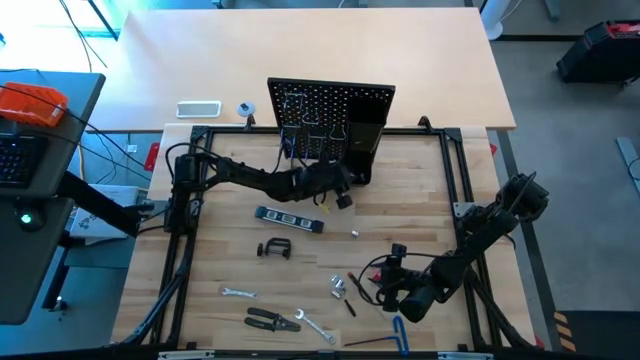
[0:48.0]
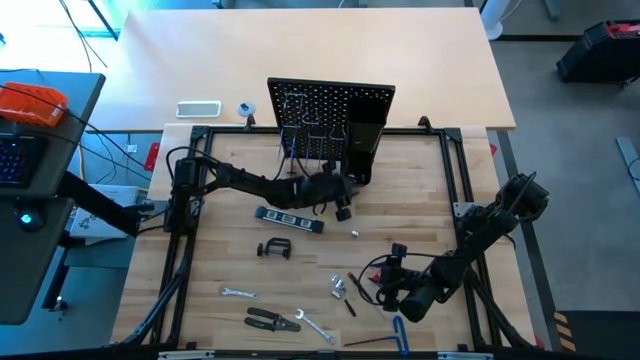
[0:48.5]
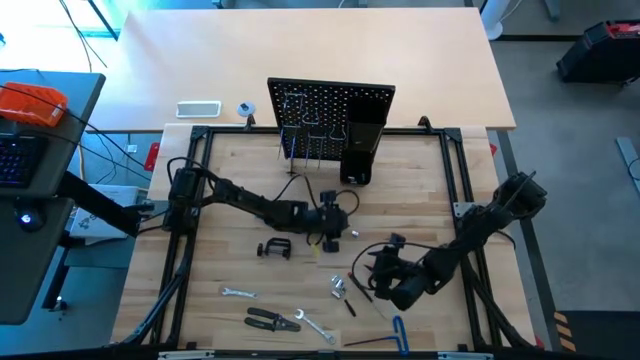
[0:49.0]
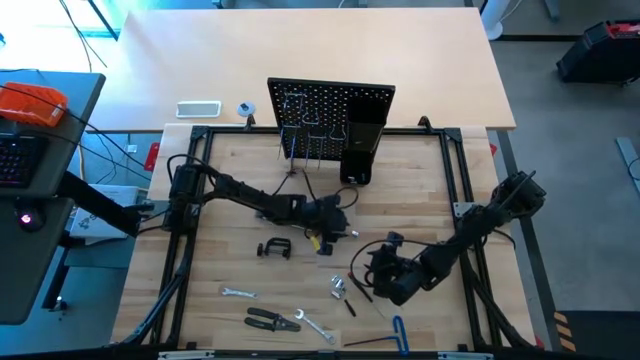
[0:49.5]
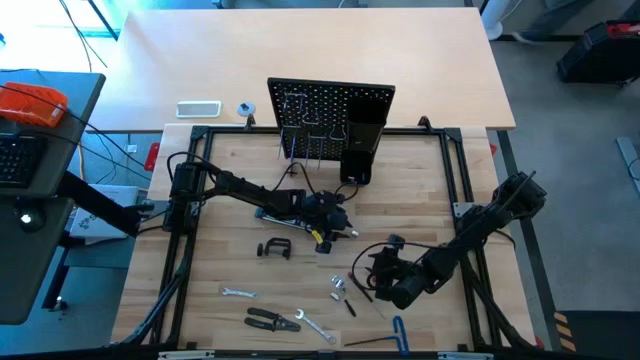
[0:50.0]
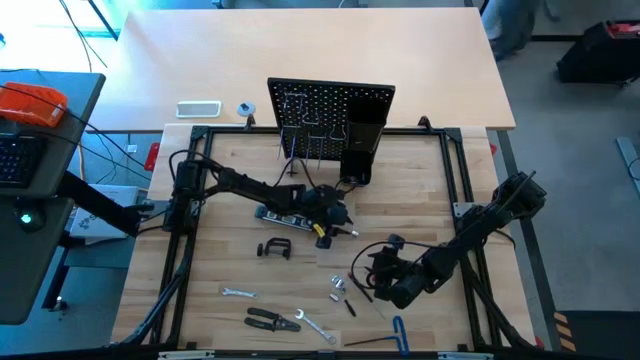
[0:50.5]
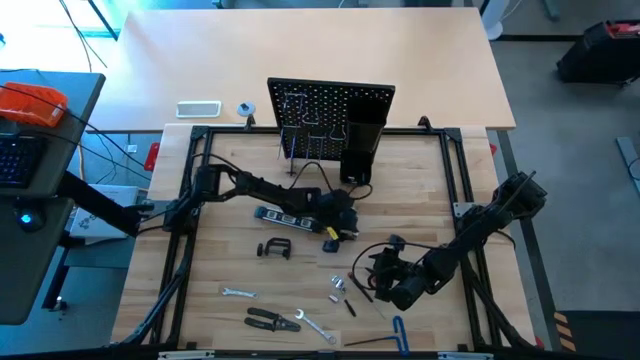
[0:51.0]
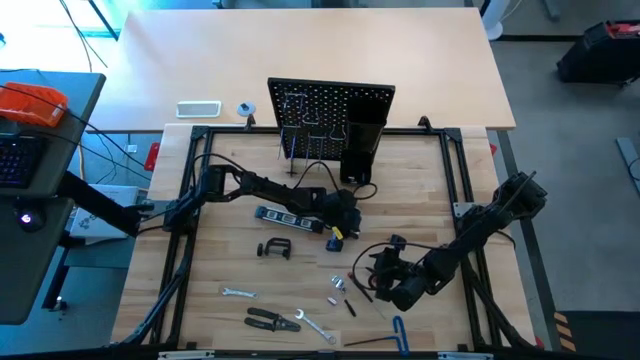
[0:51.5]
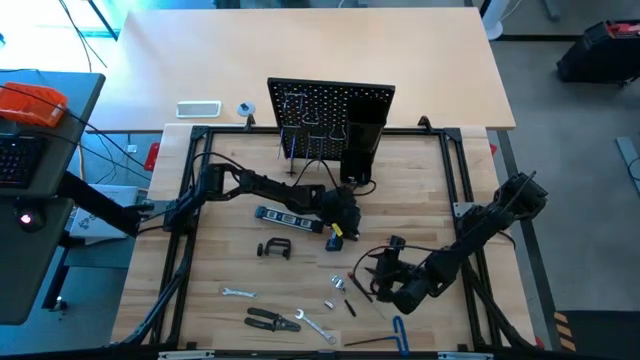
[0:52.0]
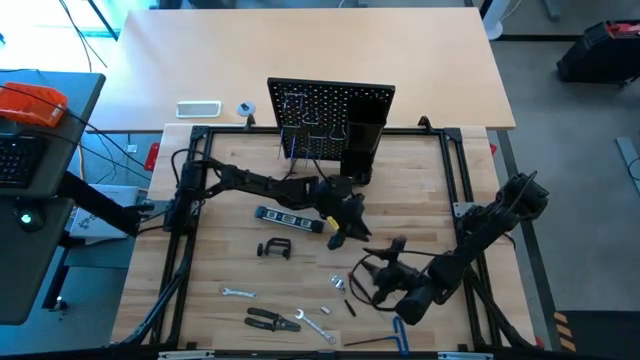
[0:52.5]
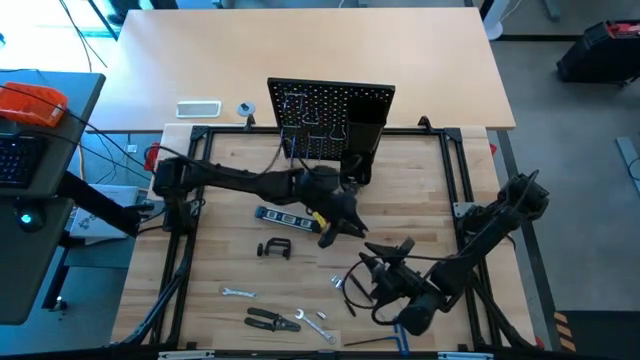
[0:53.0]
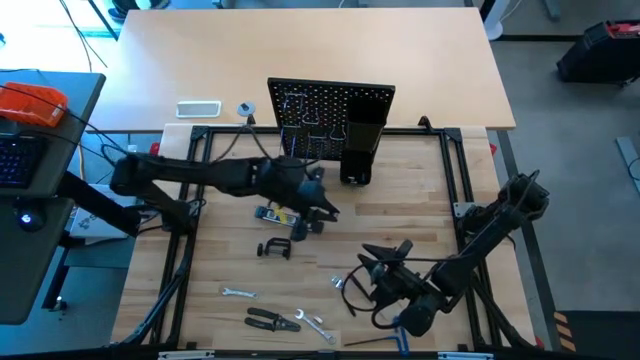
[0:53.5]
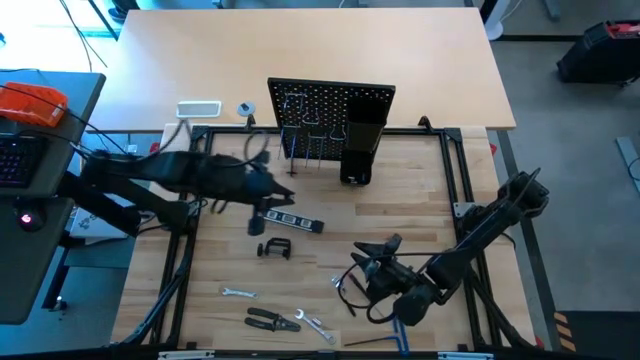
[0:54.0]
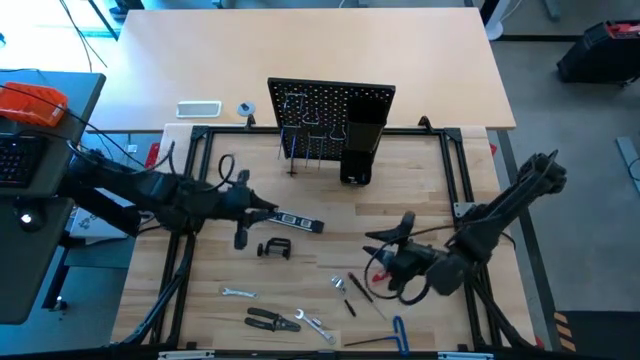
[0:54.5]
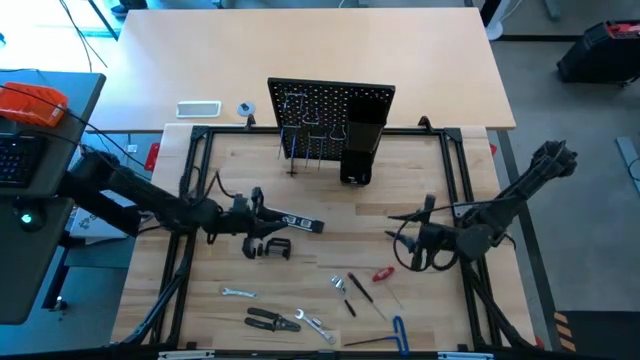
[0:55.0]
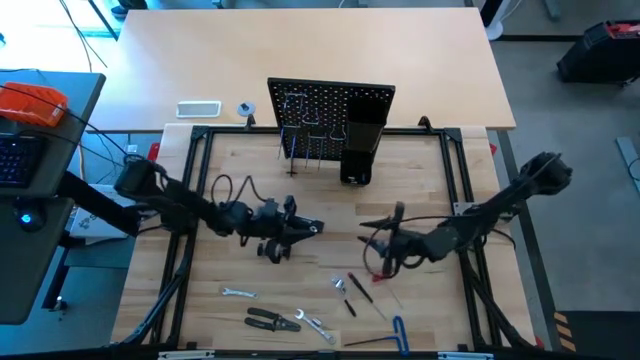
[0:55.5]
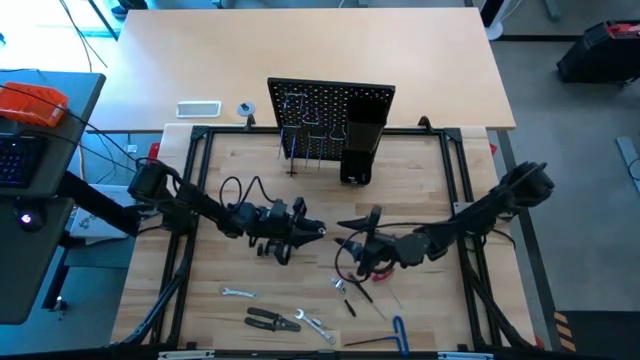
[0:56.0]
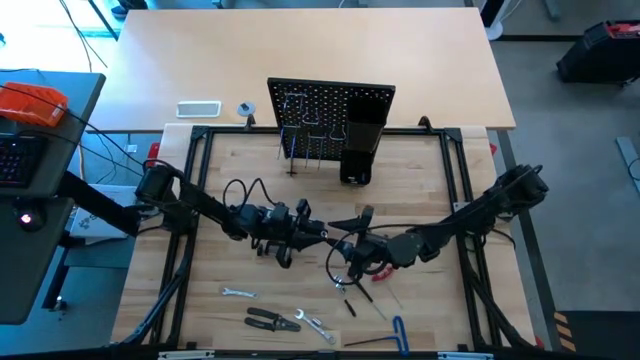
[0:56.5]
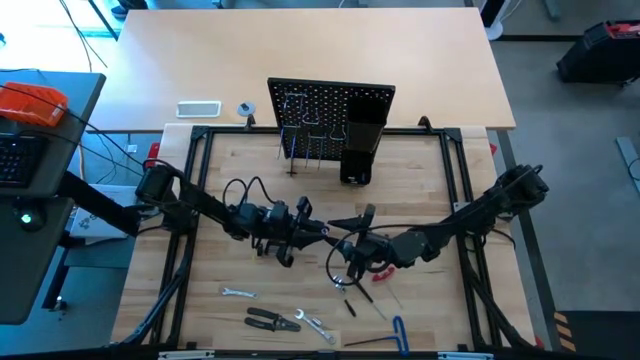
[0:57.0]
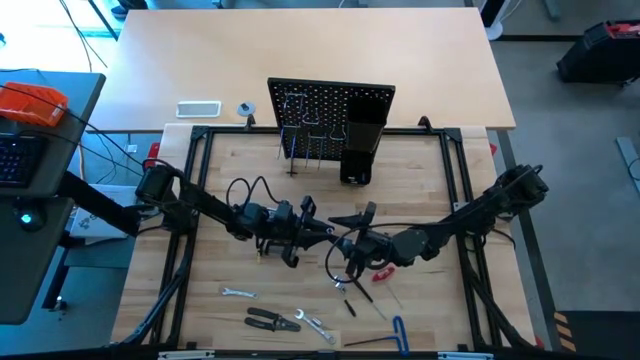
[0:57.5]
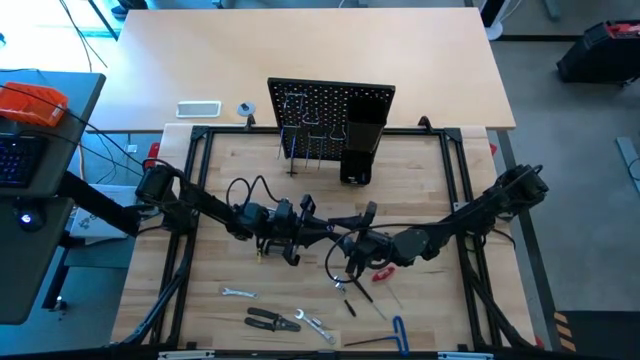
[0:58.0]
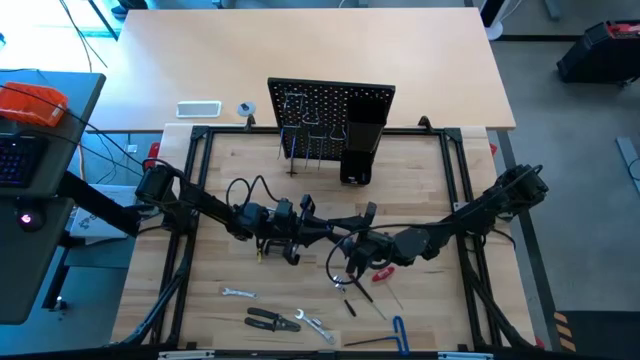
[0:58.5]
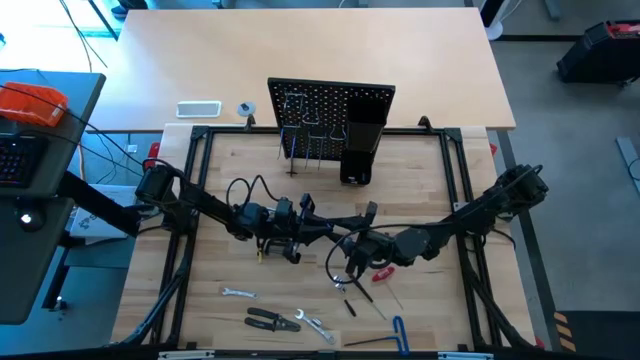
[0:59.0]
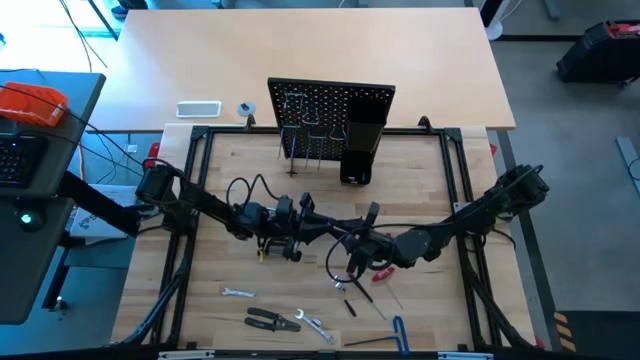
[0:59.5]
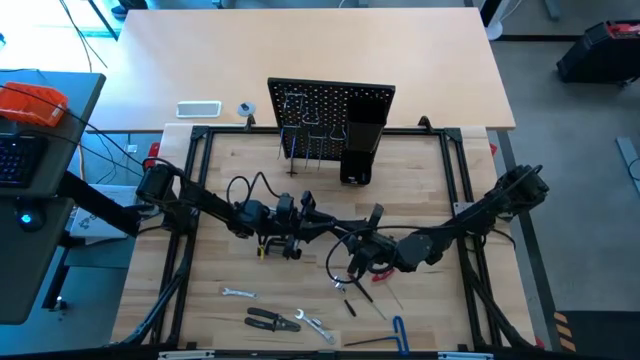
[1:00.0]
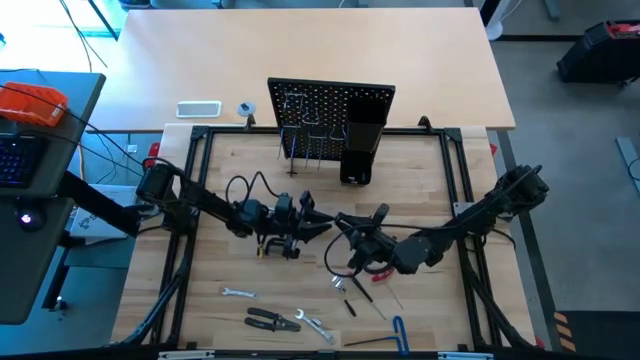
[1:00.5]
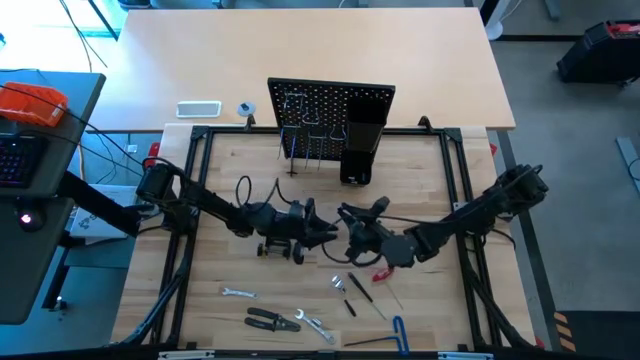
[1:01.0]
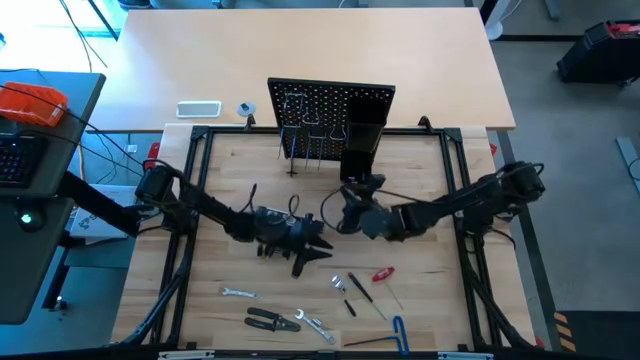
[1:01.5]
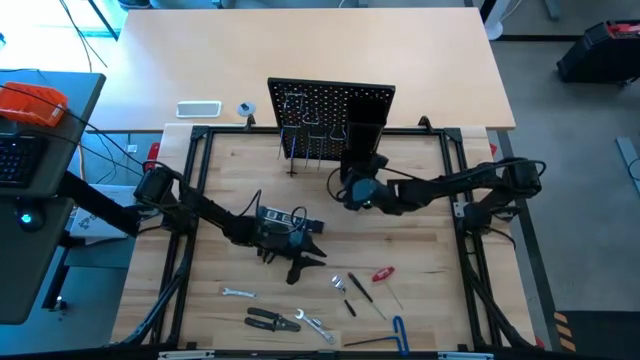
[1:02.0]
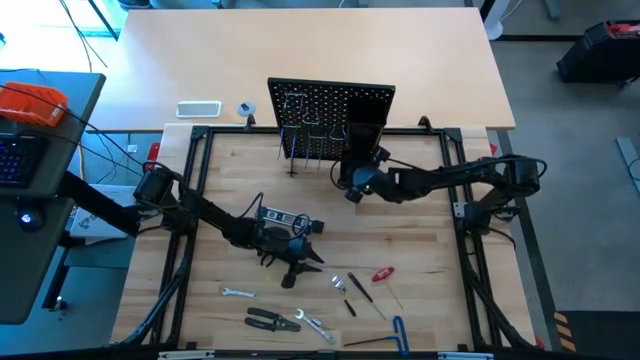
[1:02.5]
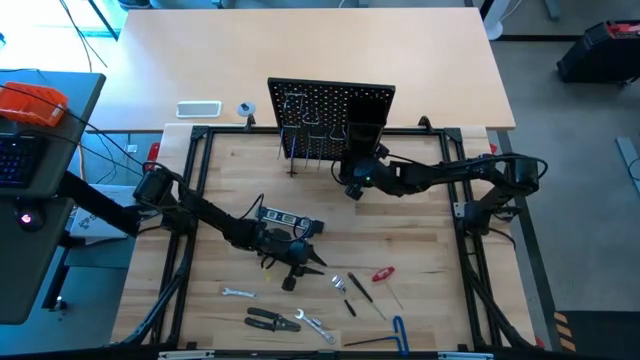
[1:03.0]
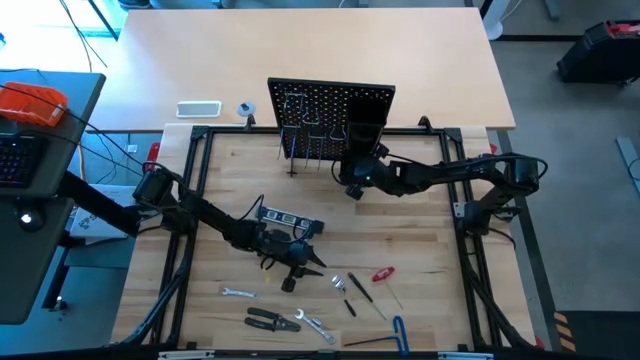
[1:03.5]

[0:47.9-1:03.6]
Task: Hang tools onto peg board
Put the top center socket into the bottom peg board bin

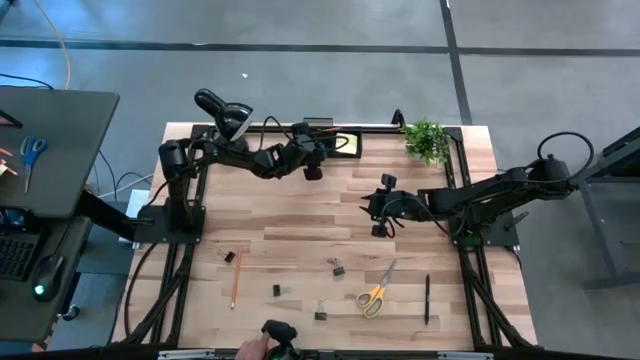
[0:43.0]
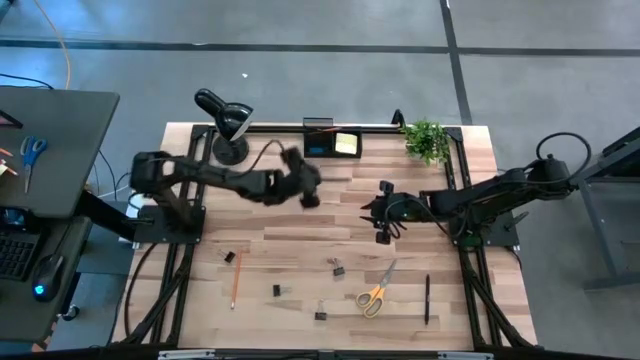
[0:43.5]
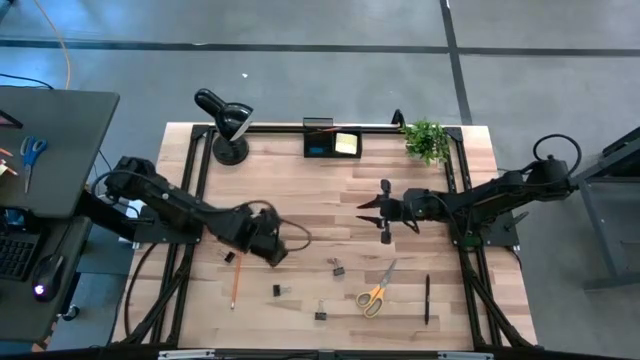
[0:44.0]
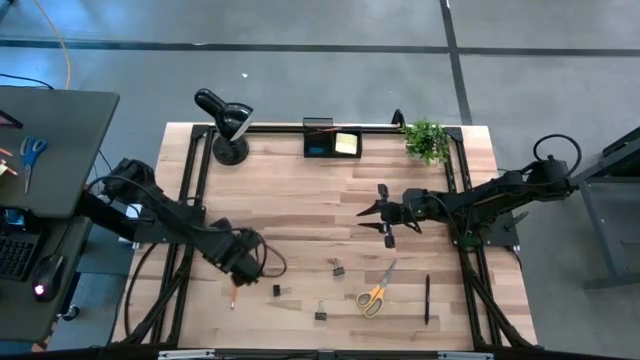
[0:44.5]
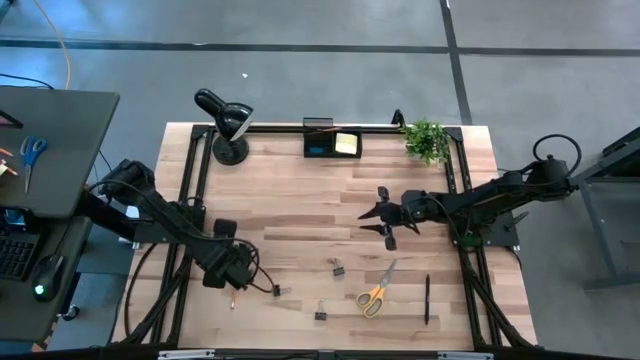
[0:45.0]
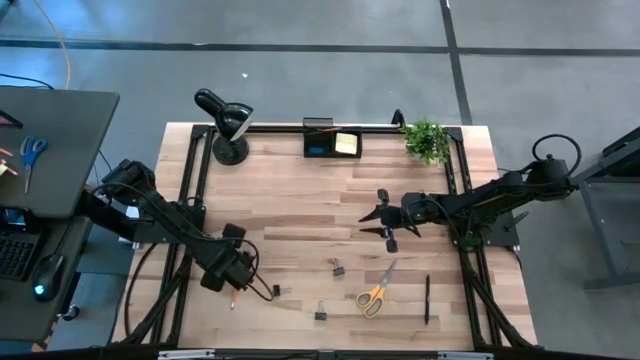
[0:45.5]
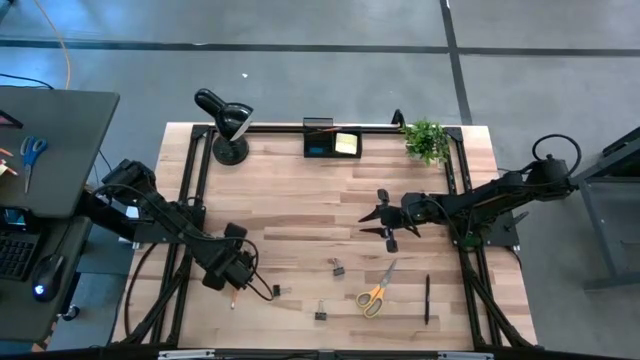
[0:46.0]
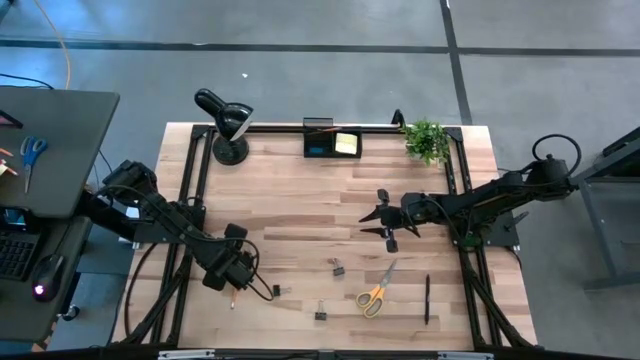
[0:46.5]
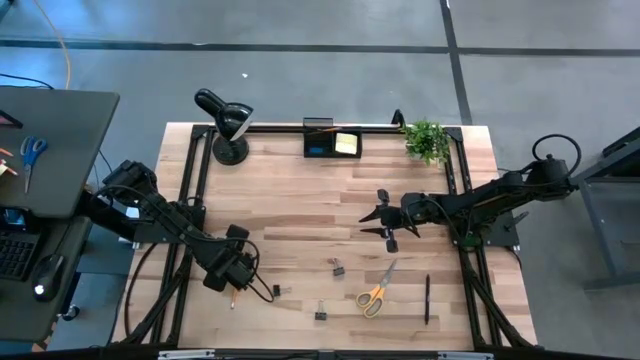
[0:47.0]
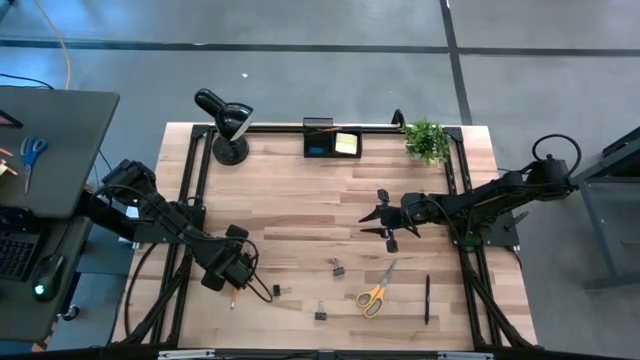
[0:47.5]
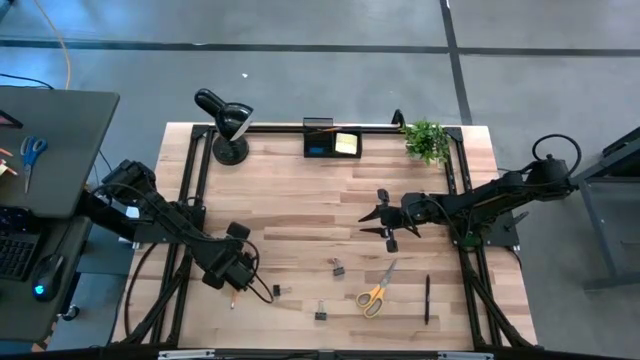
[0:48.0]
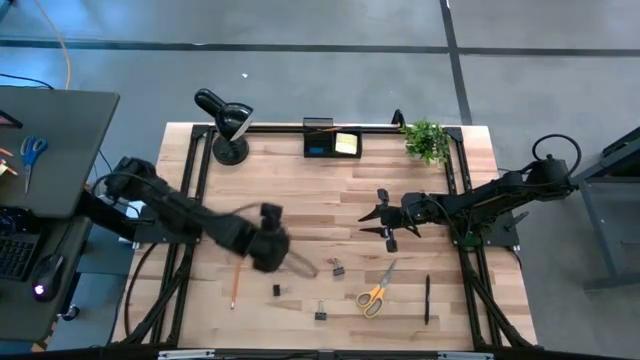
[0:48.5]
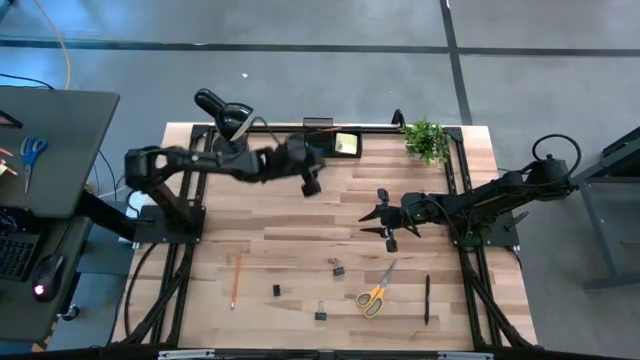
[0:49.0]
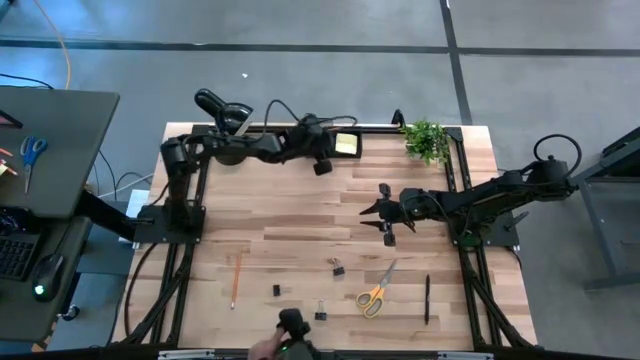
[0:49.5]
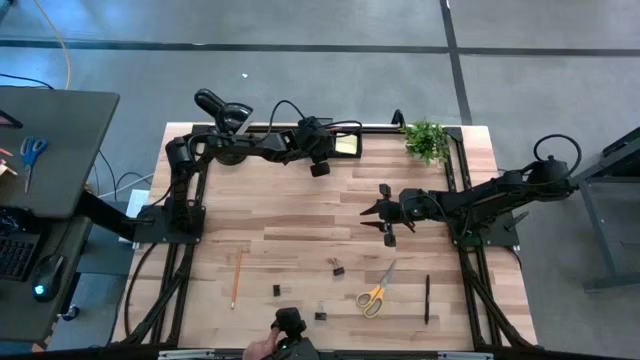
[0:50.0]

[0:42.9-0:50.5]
Task: Pick and place office supplies into organizer
Put the black binder clip into the black desk organizer
